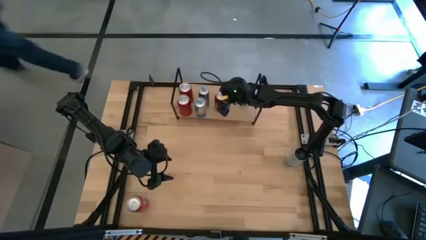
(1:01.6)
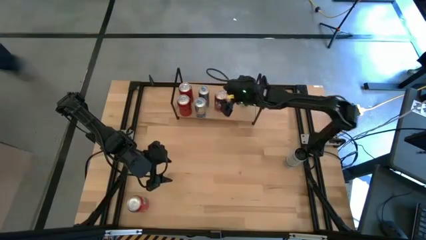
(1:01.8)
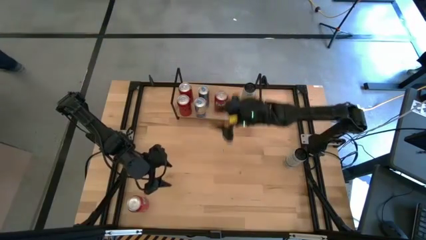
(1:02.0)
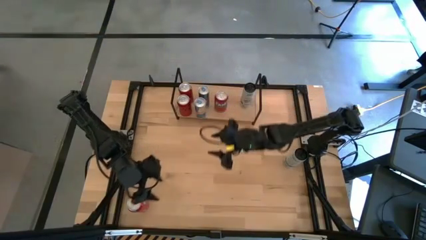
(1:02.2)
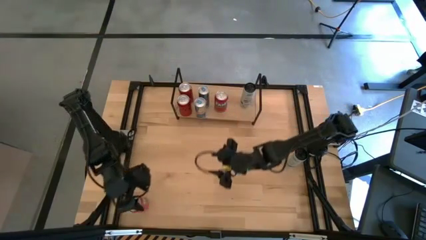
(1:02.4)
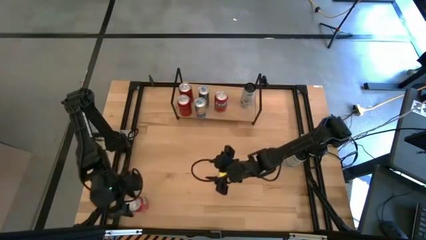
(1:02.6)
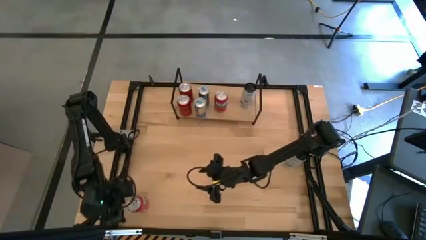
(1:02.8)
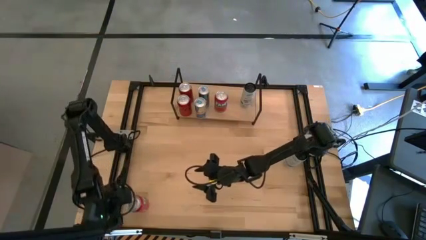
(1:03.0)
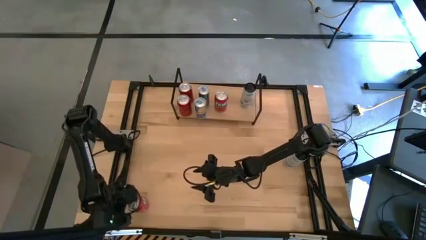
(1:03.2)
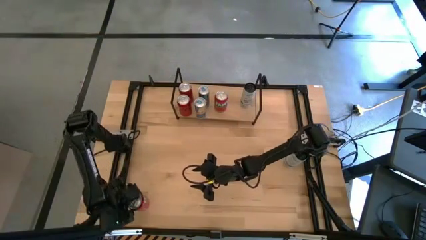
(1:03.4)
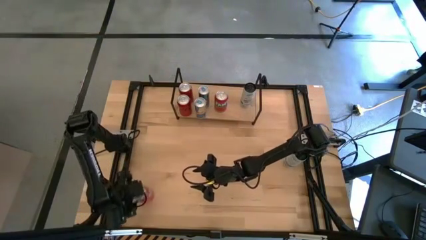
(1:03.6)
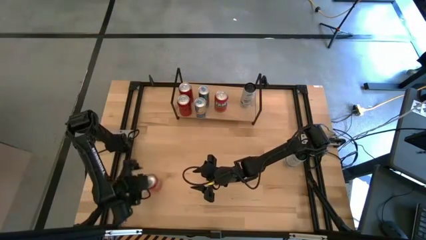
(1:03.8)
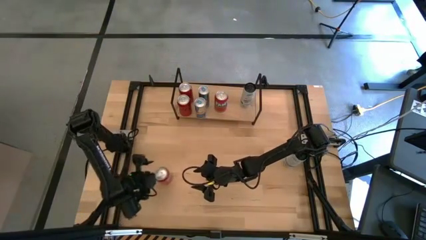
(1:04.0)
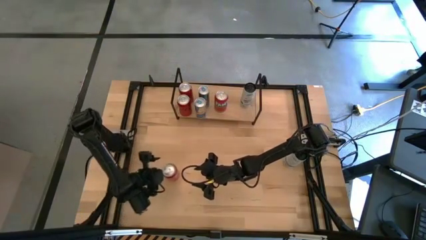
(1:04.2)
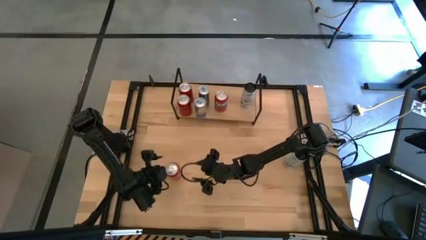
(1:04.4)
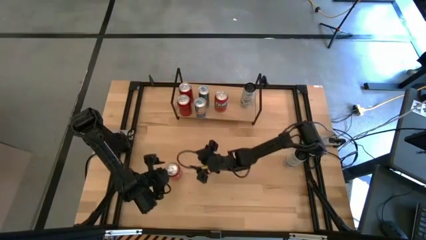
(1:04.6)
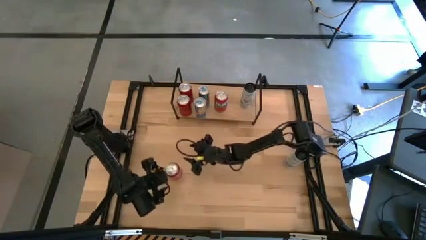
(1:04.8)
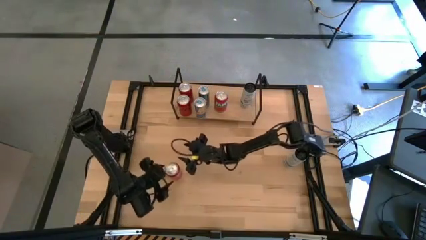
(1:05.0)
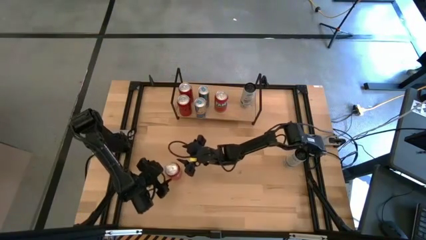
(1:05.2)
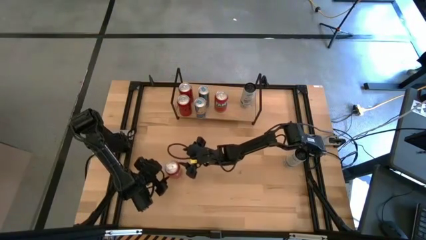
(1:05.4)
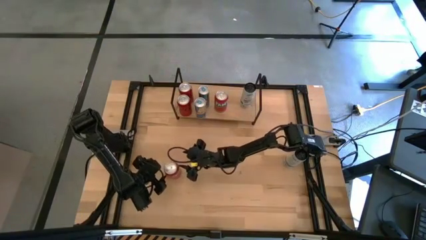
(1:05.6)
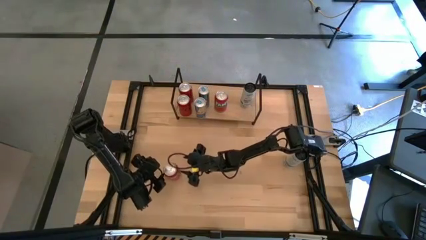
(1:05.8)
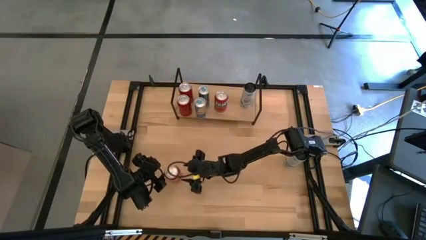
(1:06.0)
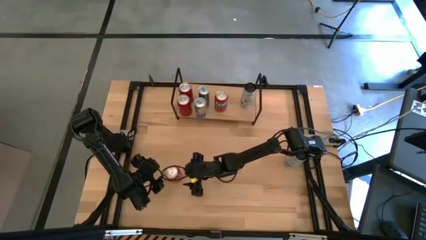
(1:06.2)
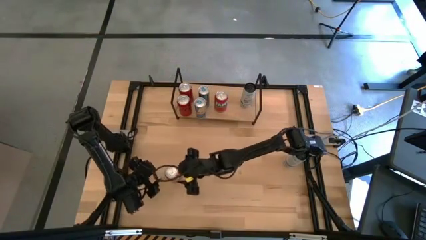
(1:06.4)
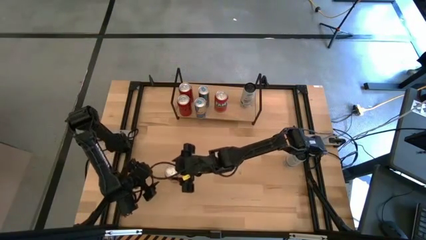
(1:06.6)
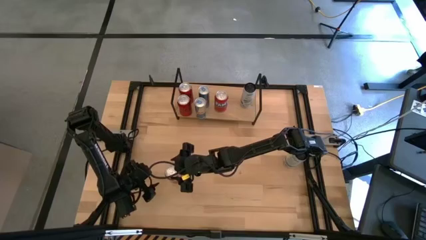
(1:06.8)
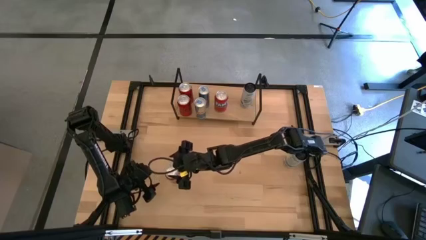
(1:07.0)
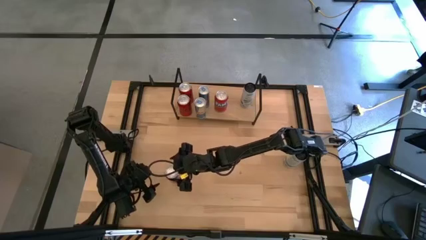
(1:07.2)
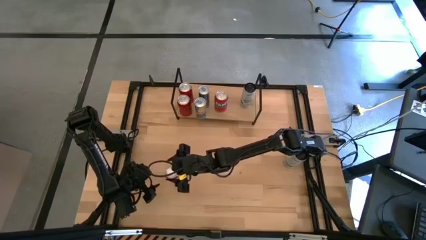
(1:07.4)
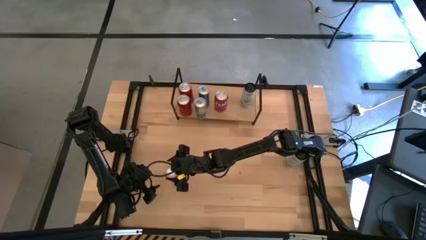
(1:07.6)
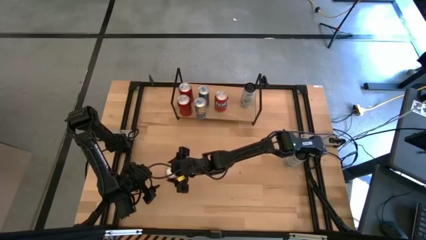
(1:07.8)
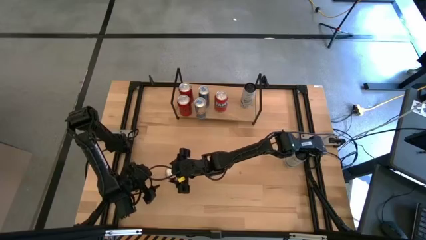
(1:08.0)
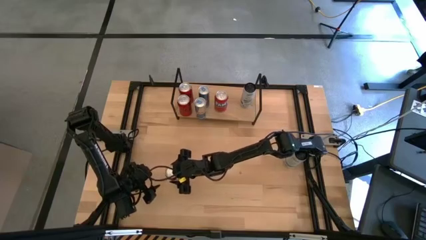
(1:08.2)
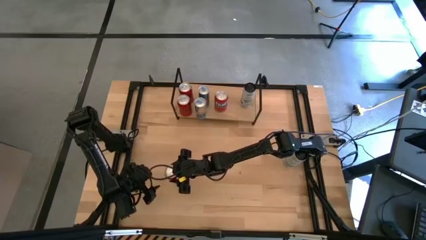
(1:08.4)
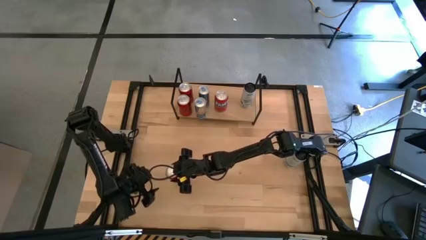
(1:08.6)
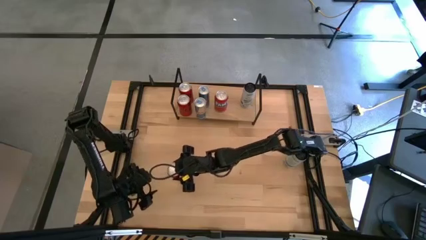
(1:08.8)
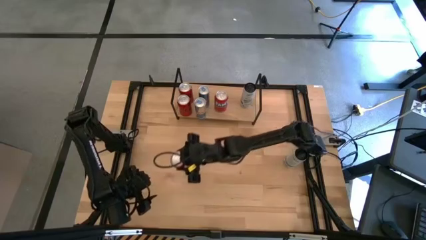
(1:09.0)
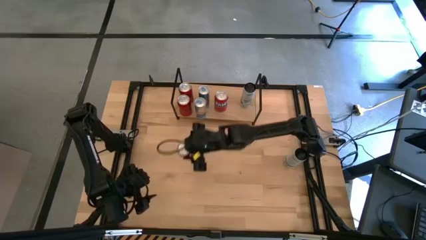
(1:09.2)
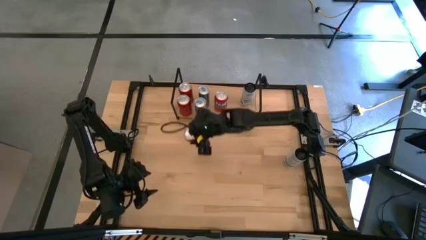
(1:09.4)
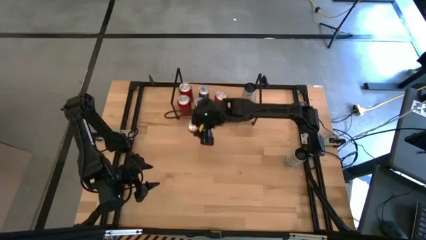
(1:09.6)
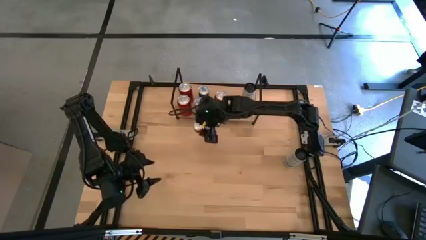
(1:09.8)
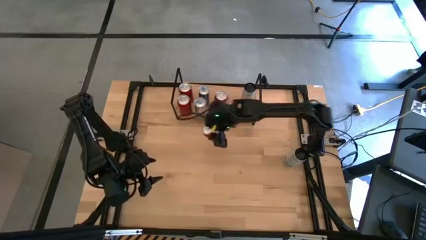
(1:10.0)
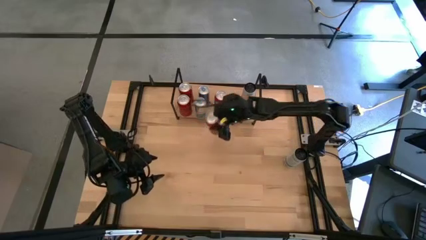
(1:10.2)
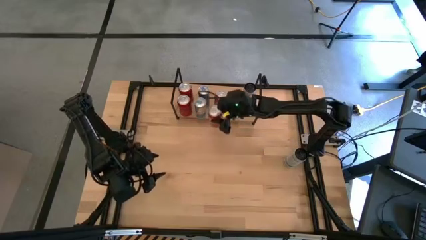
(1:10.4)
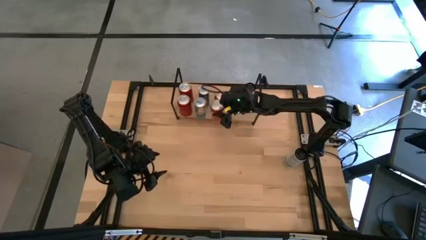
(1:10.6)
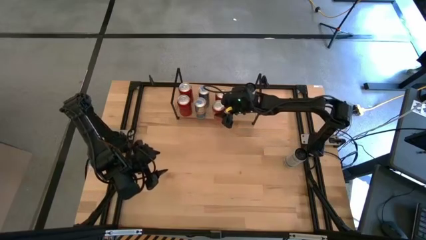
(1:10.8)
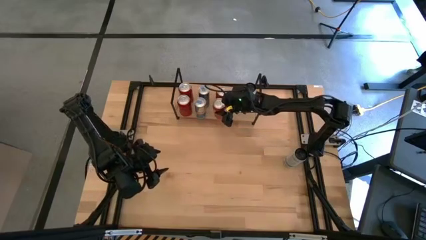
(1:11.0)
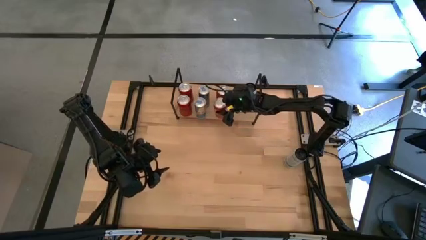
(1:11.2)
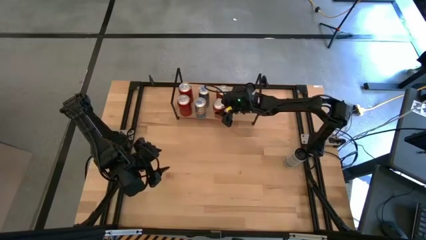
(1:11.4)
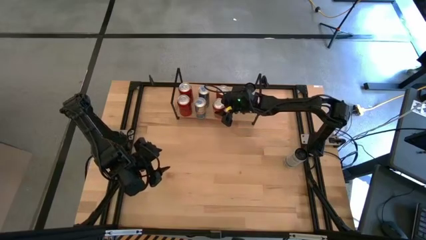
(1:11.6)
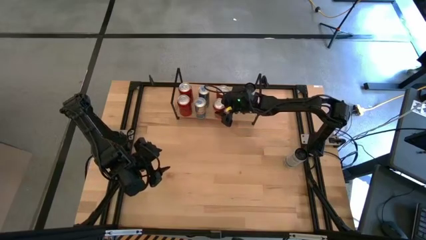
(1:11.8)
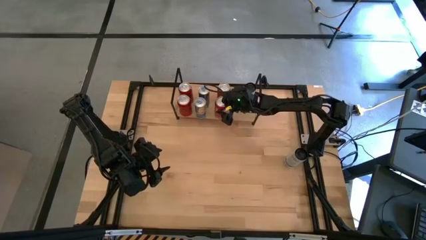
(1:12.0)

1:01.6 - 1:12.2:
Task: Place canned beverage on shelf
Put the red soda can on the shelf aligned with the other red soda can

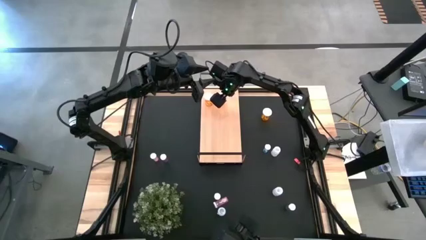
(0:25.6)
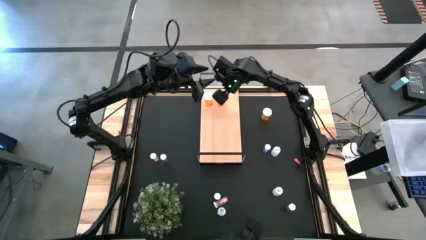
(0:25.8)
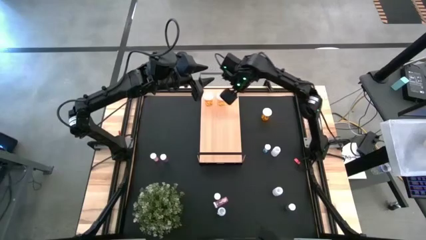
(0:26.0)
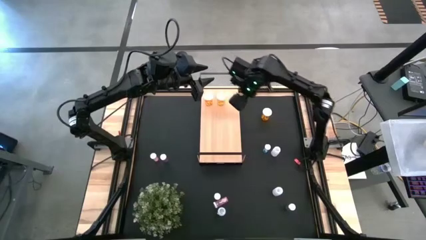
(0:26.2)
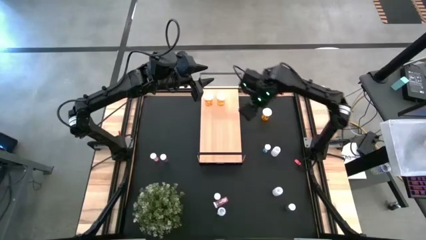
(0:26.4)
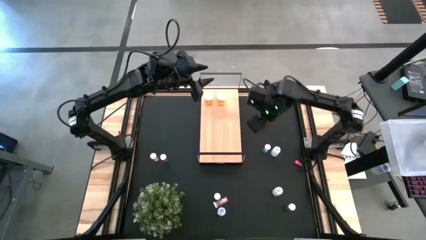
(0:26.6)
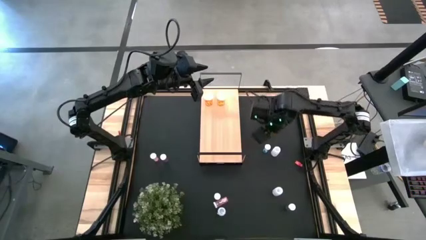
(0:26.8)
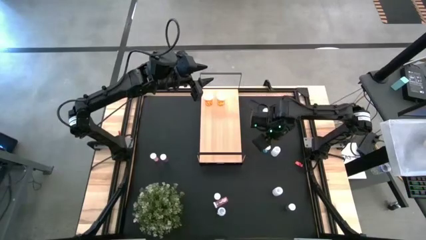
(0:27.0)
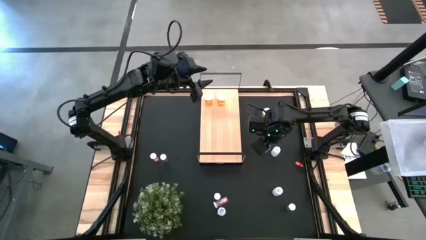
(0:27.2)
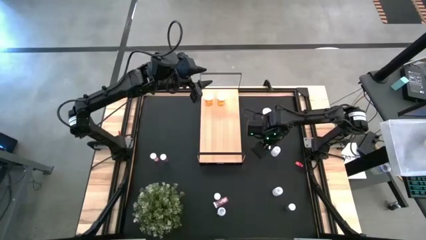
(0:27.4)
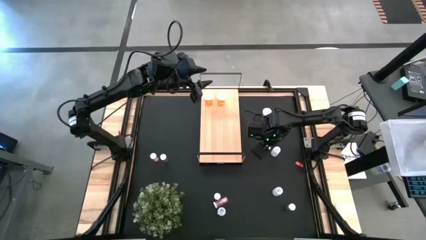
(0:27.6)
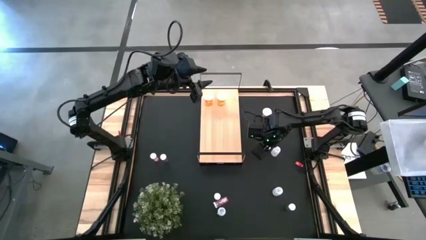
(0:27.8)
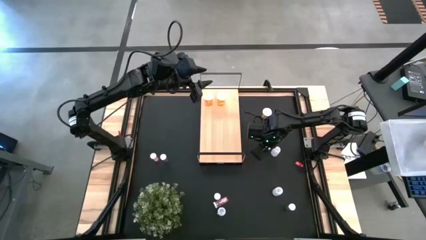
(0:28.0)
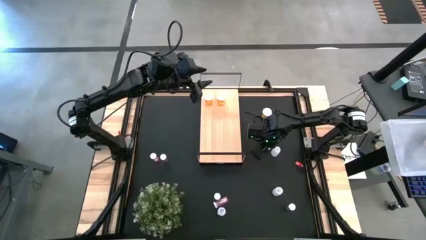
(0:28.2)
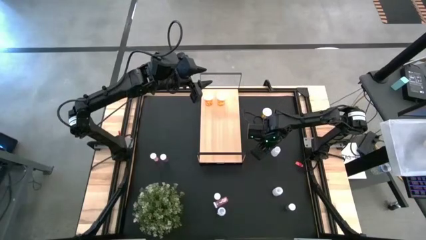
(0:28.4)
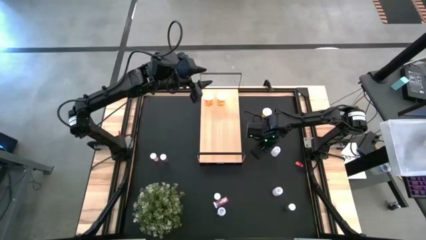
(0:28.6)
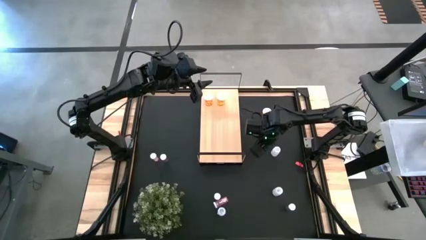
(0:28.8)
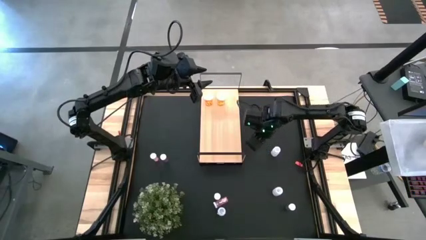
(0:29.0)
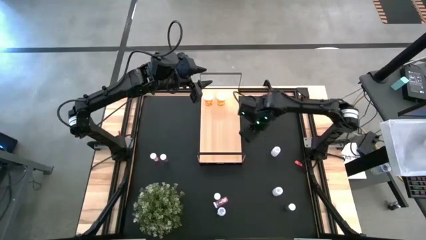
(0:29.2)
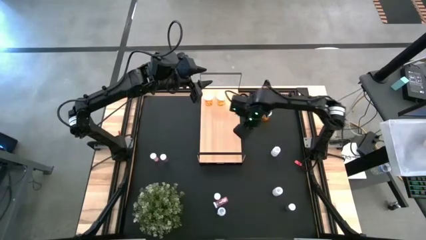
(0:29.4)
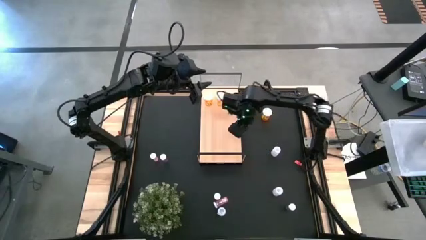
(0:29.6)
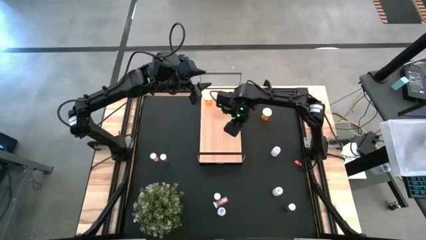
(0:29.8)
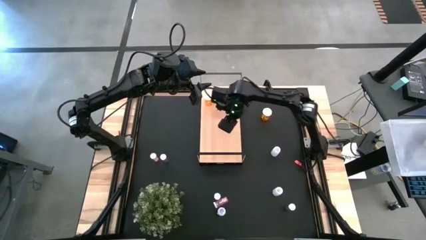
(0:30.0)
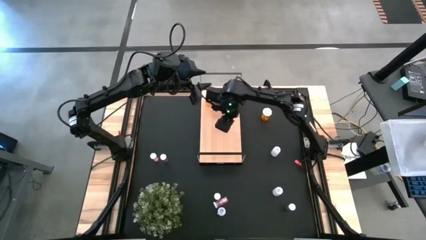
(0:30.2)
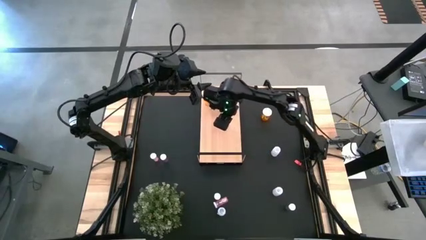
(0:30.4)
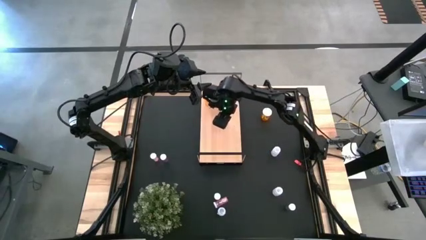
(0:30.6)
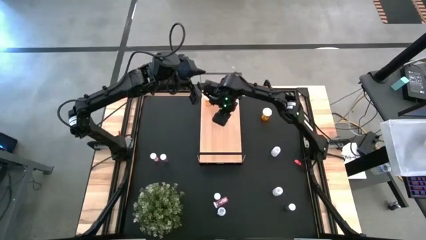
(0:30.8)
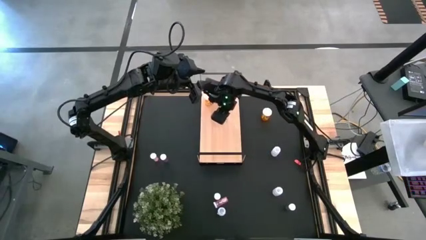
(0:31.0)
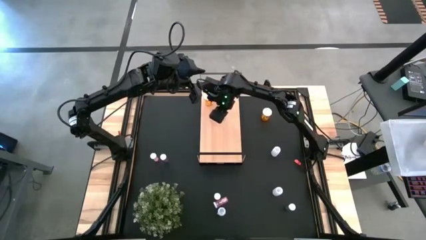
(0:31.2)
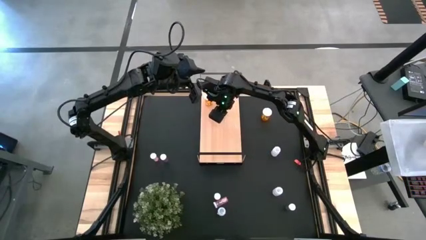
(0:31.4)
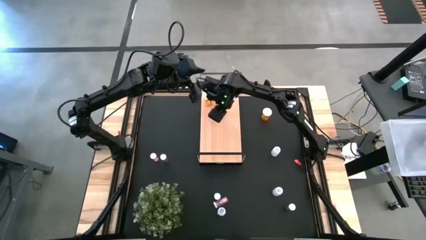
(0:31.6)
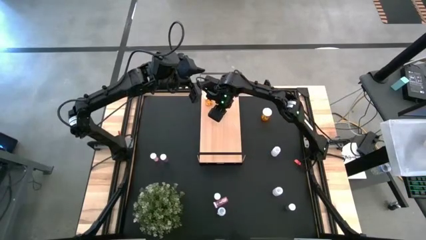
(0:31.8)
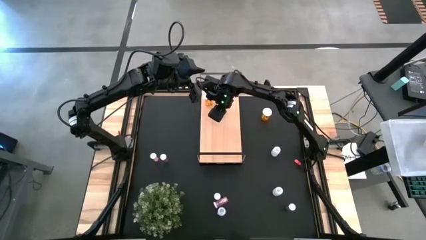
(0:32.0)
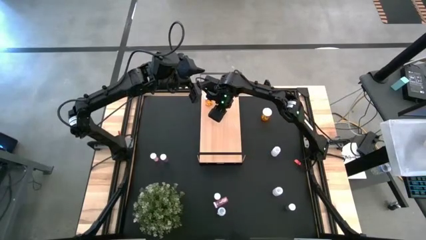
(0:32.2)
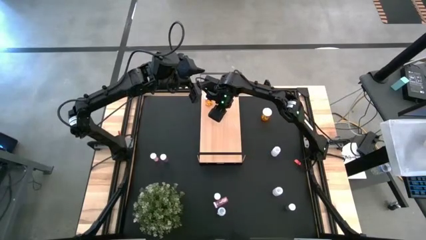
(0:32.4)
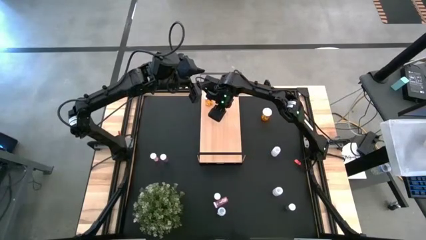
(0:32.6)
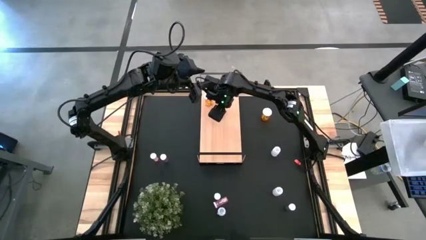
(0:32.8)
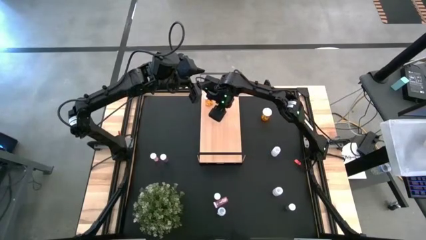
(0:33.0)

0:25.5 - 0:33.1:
Task: Pick and place medicine bottles onto shelf by color
Put the top right blue pill bottle on the shelf
